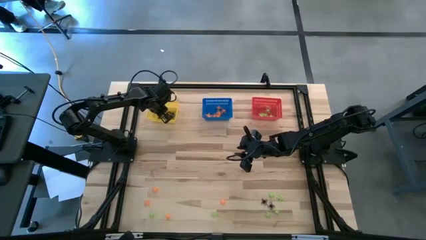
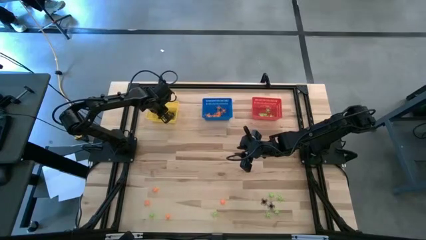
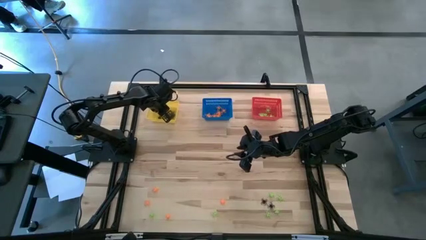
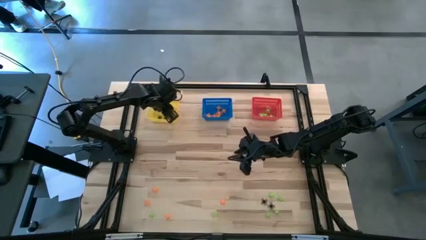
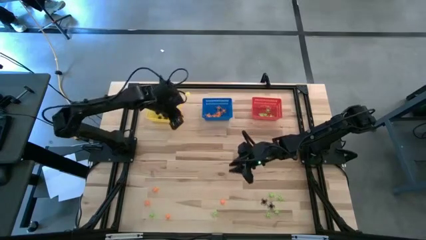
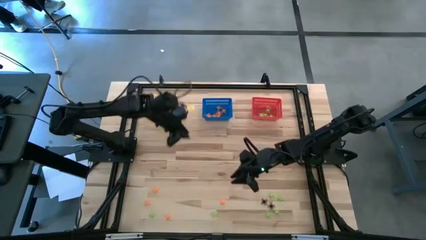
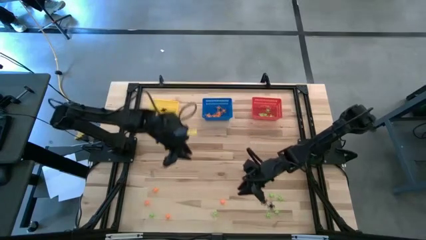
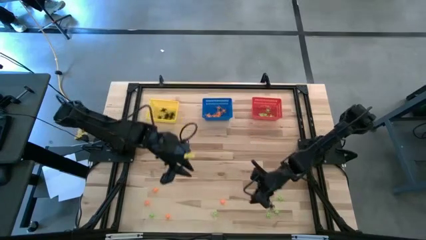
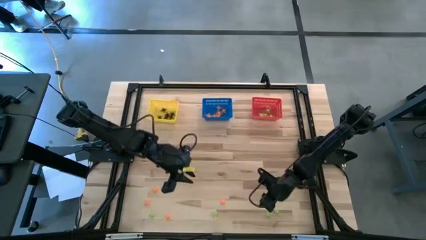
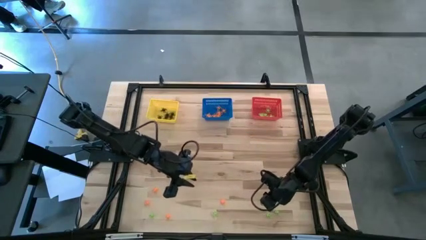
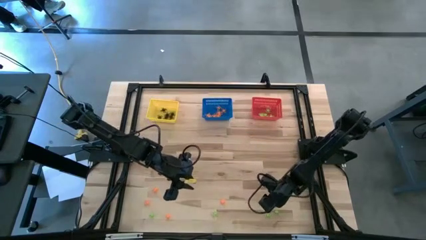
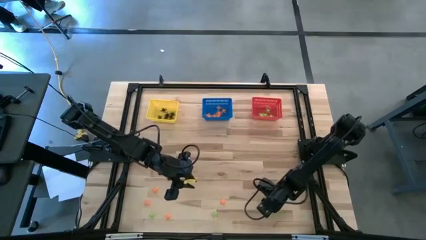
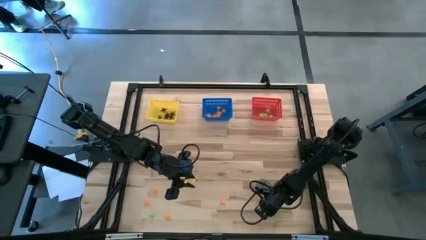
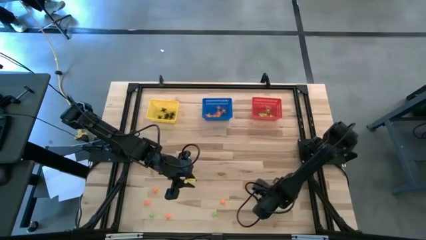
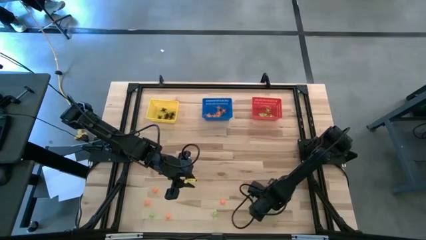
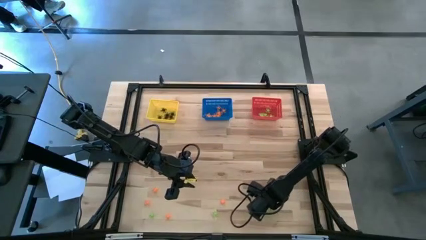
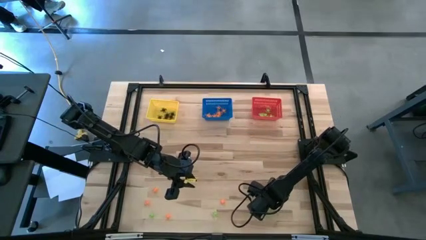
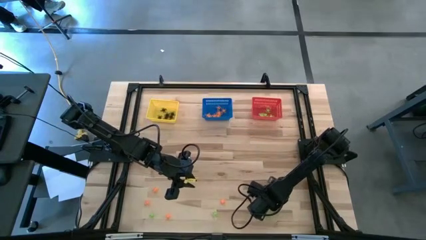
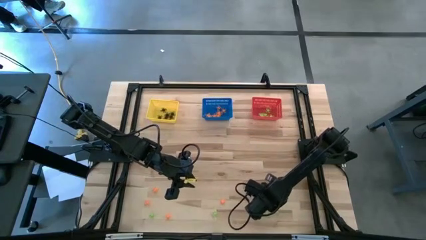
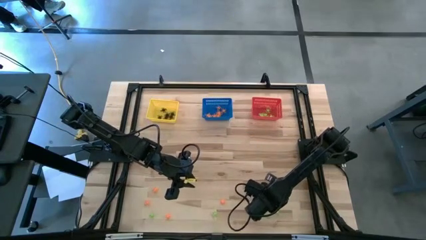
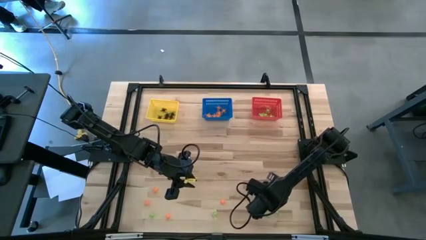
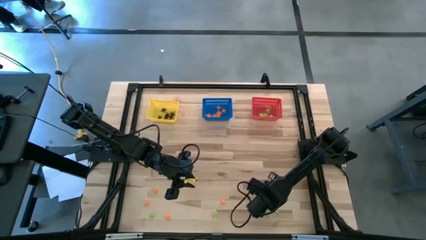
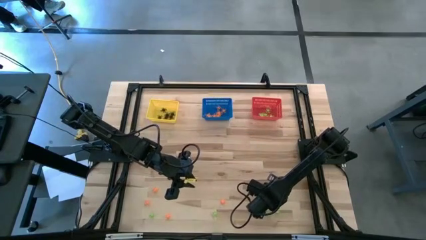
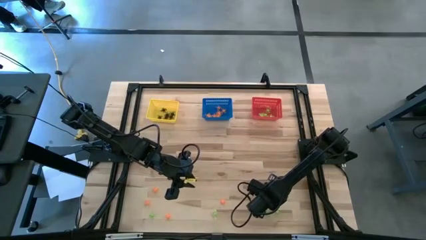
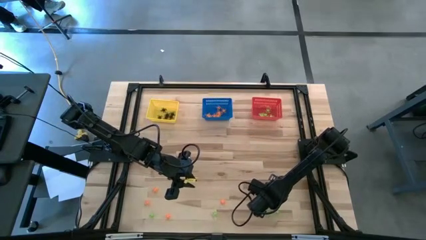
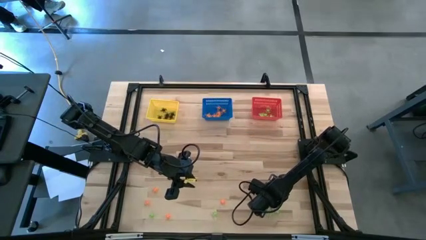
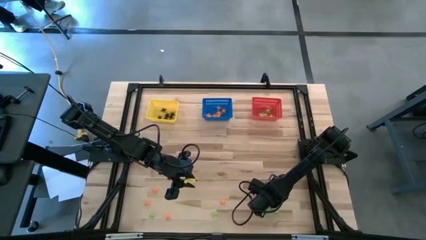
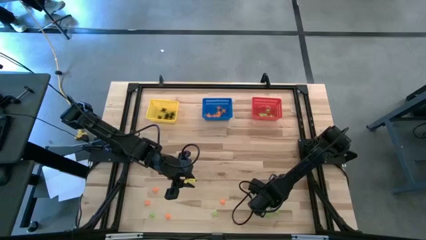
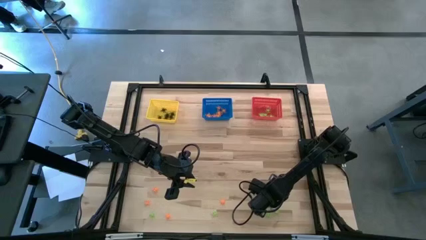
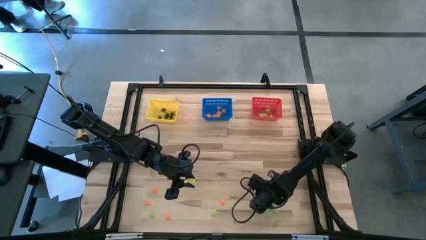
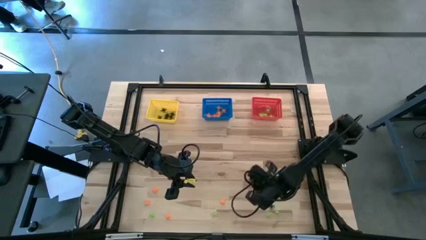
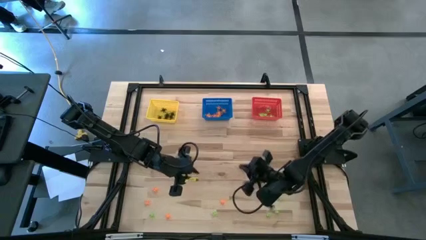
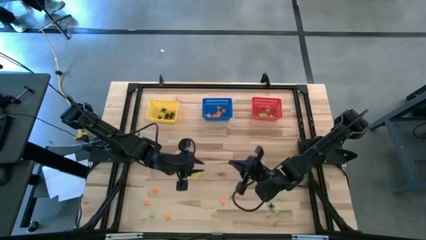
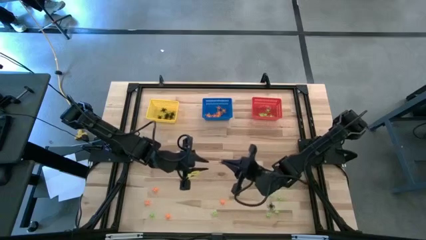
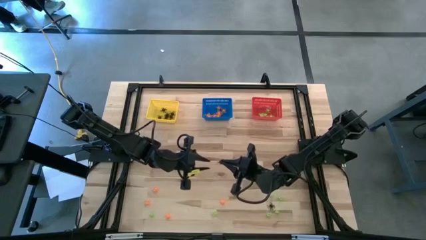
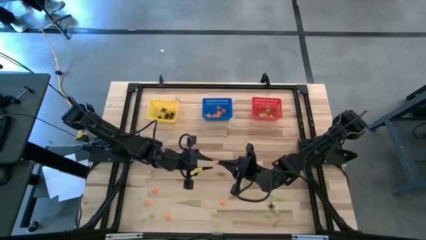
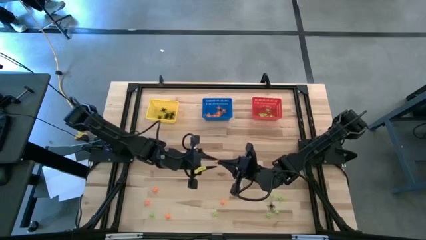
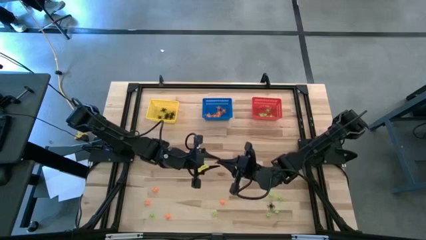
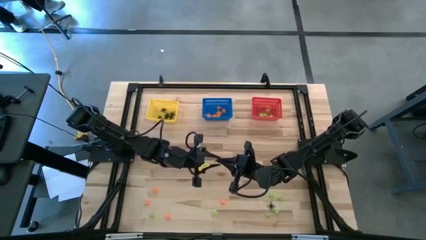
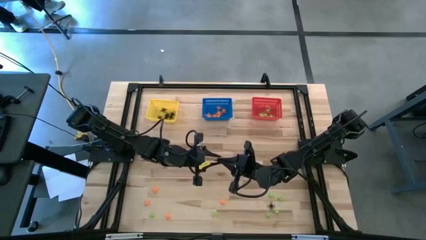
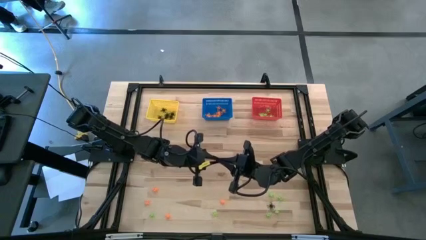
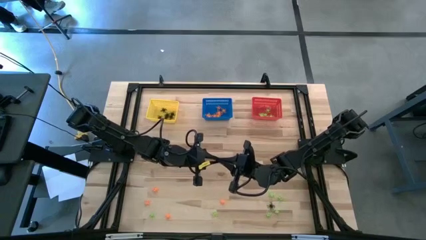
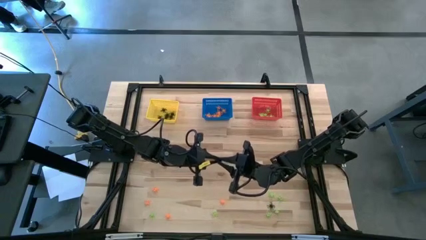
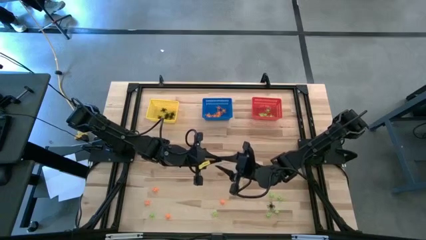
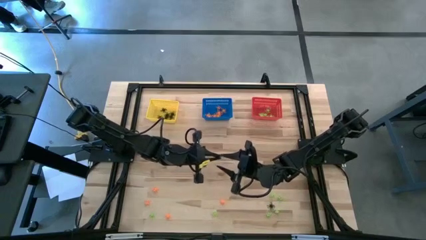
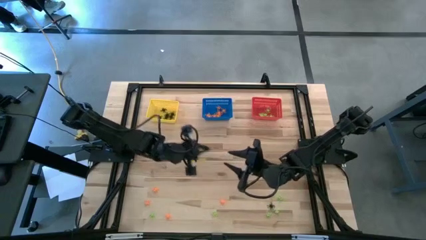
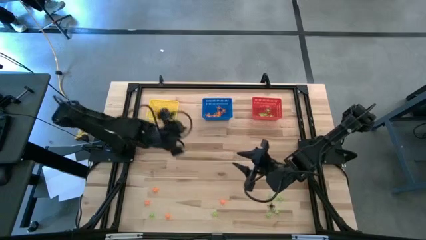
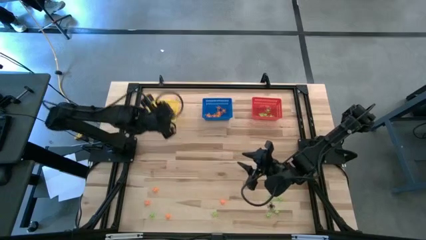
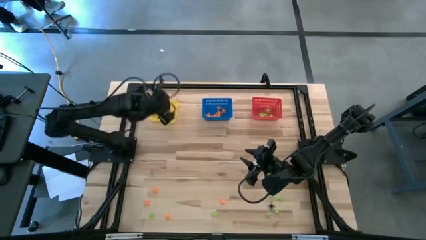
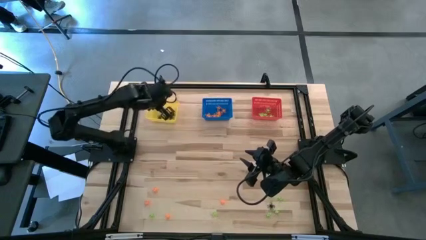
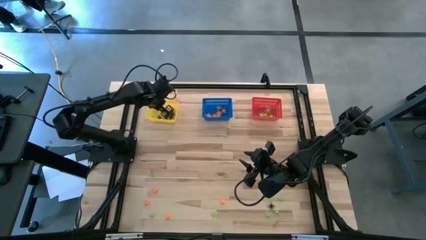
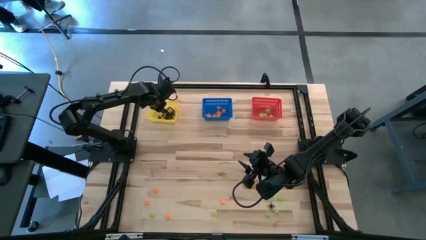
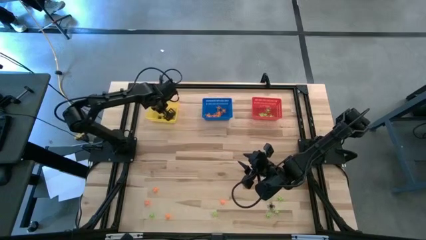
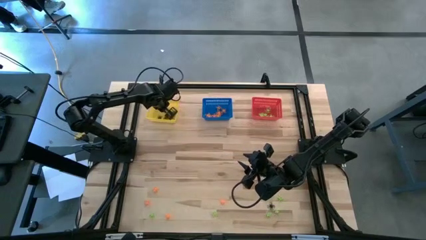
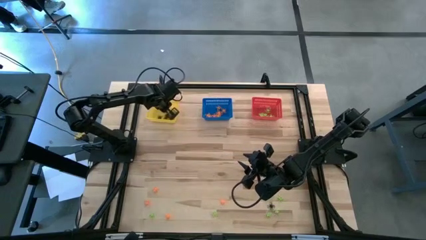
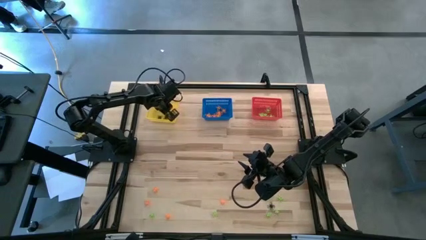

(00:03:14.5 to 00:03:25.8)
Task: Sort Halloween decoration
Put the black spider toy into the yellow basket
